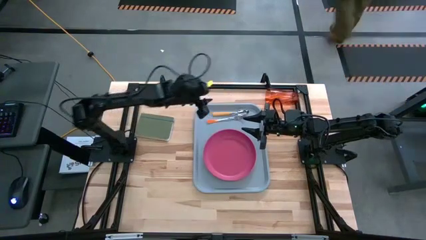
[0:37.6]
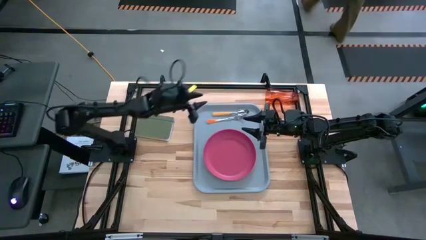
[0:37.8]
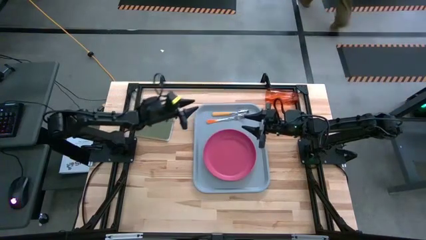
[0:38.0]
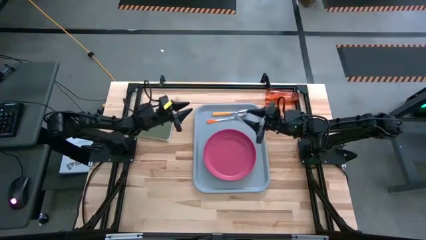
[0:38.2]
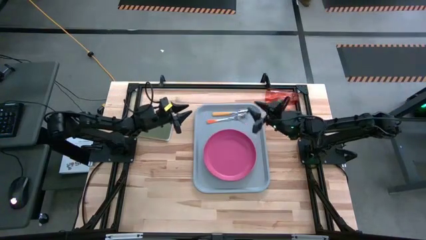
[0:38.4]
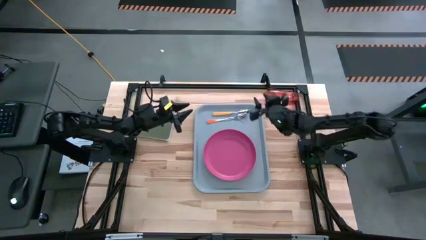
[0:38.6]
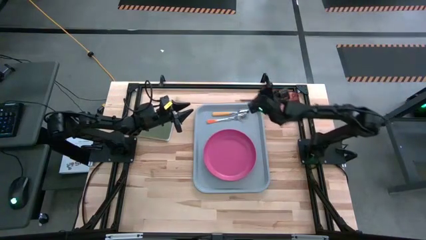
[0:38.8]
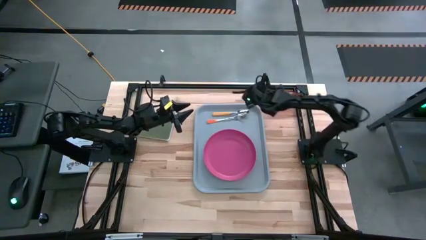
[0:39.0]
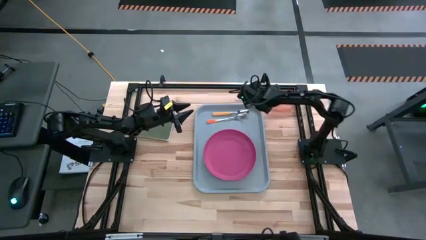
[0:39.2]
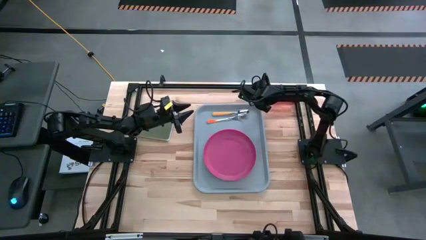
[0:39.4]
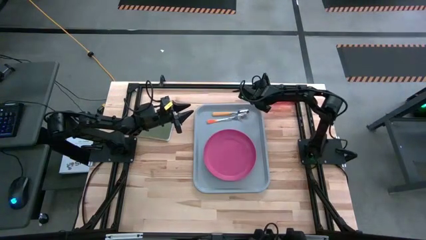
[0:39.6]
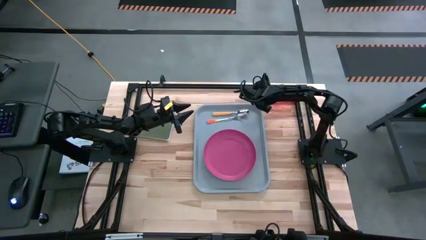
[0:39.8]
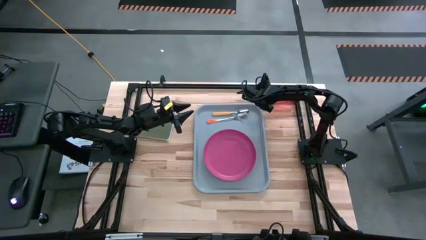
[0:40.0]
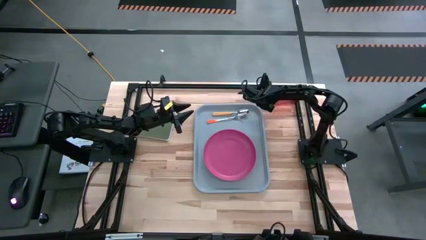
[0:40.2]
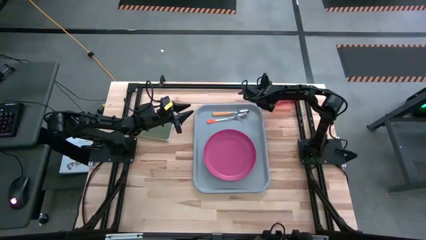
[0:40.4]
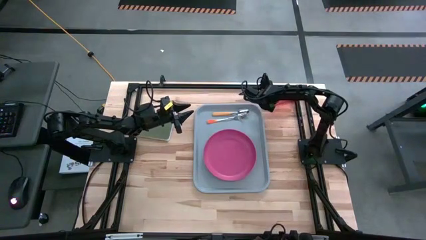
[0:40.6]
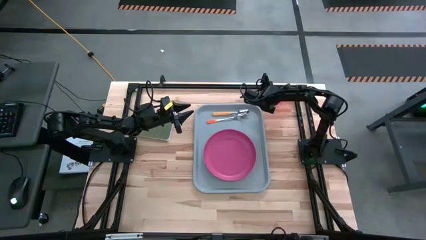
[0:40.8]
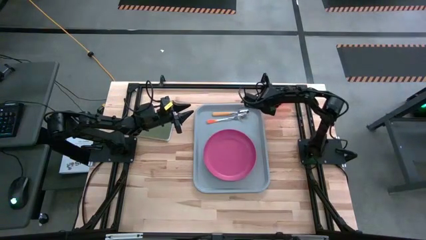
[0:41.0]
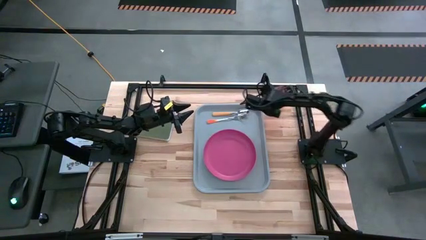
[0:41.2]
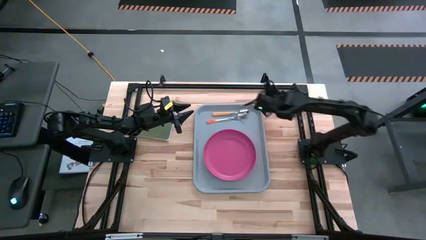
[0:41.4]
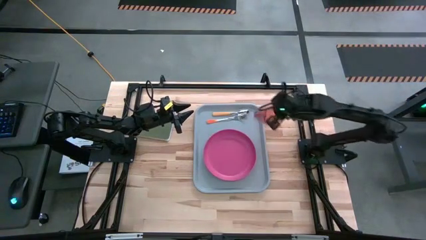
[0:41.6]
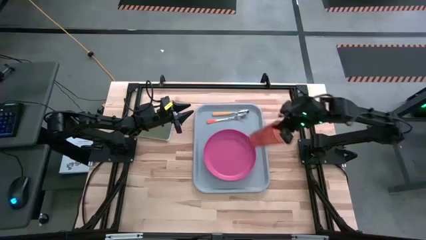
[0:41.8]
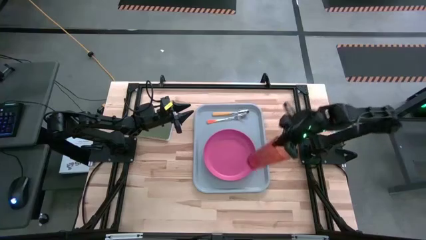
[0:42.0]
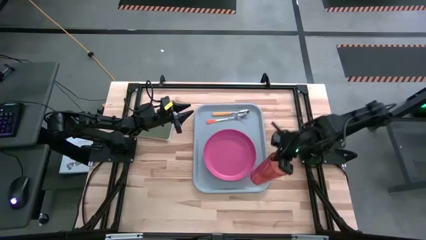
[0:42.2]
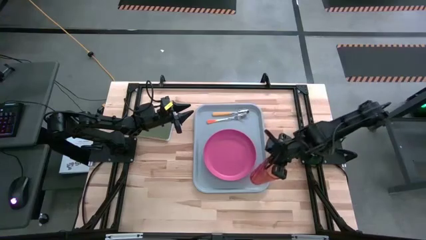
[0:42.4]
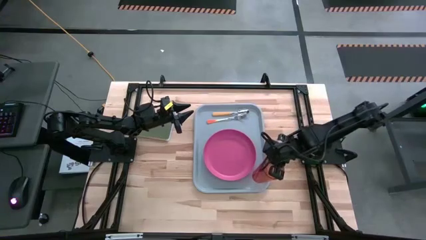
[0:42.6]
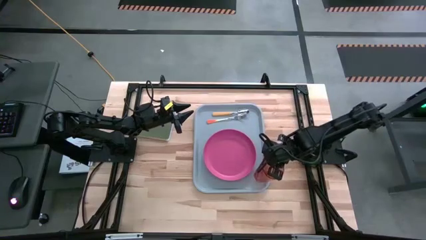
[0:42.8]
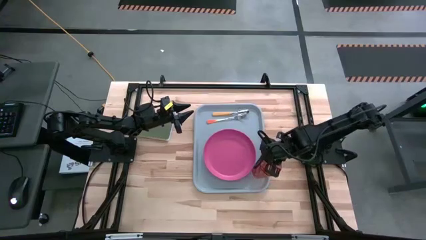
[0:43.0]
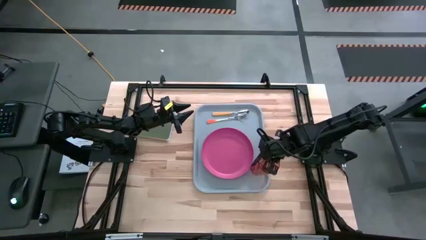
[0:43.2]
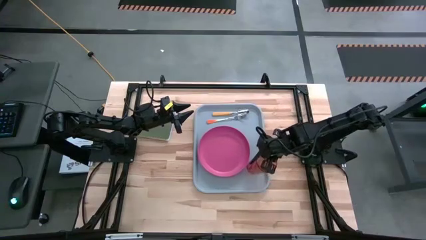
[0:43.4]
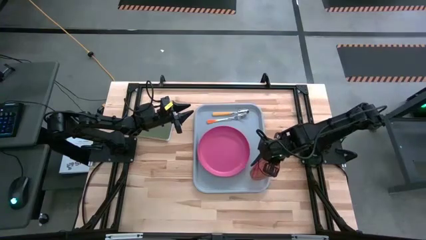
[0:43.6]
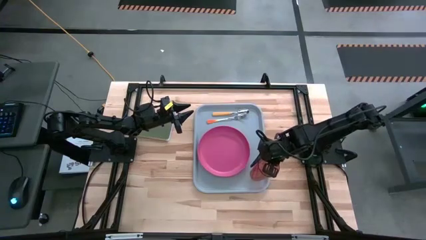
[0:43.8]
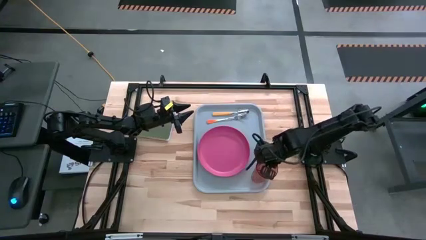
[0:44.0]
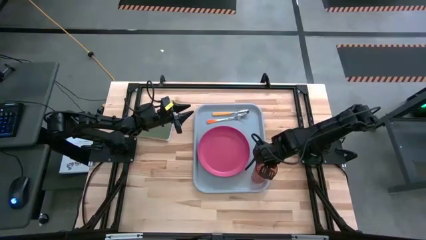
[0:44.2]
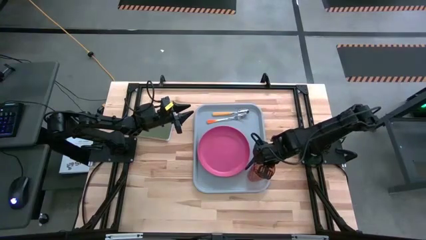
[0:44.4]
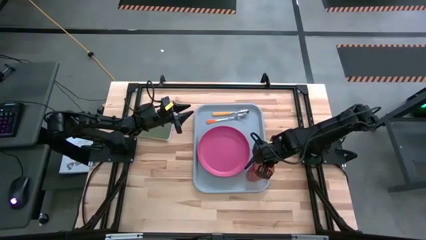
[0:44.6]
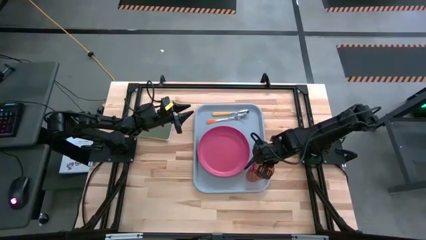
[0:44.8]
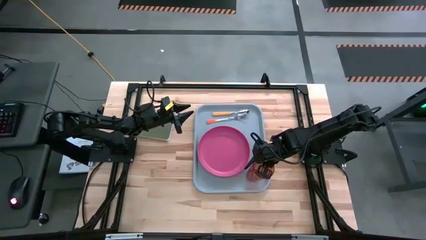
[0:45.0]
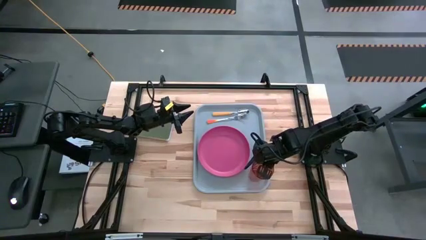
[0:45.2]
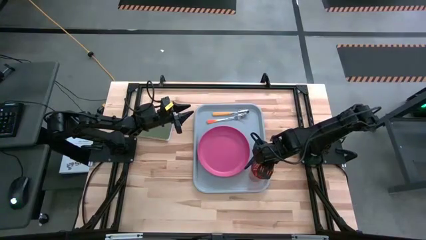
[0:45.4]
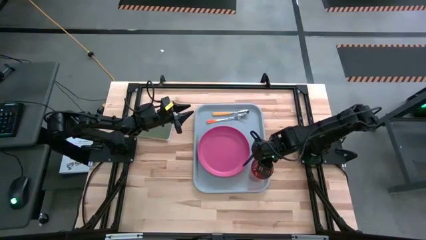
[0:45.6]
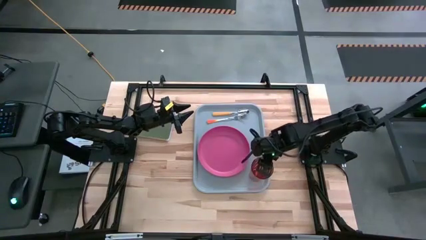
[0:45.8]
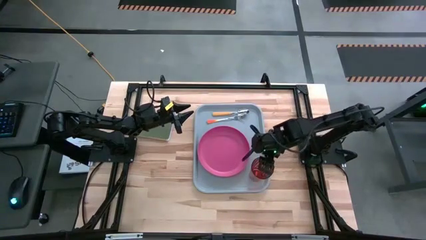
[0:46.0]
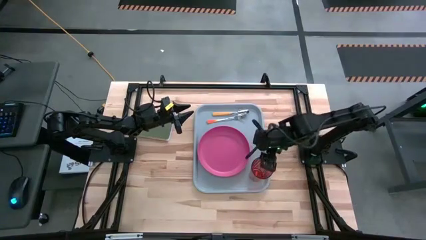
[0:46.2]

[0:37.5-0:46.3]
Task: Pick and place plate/cup/fork/spoon on tray
Put the red cup on the gray tray

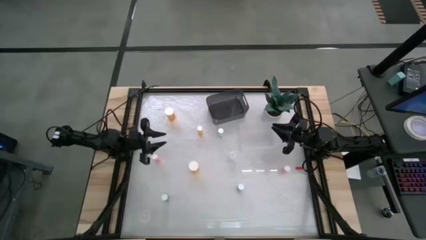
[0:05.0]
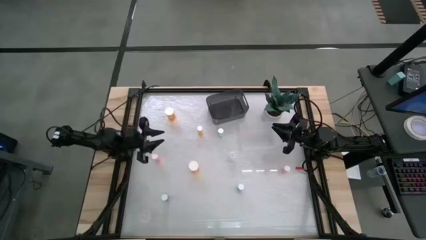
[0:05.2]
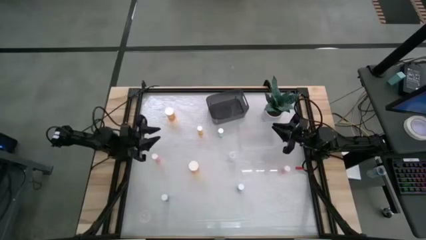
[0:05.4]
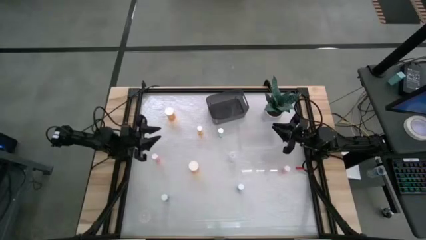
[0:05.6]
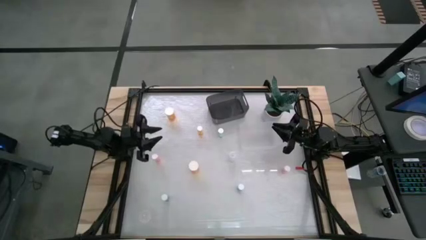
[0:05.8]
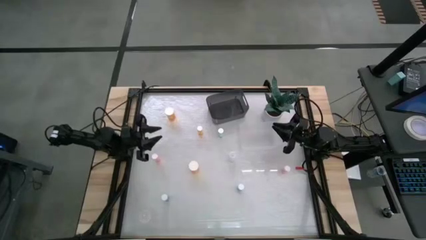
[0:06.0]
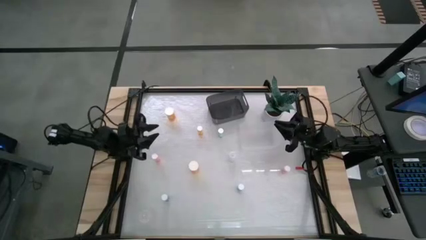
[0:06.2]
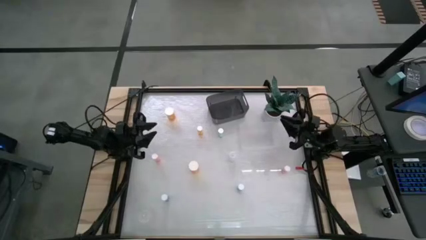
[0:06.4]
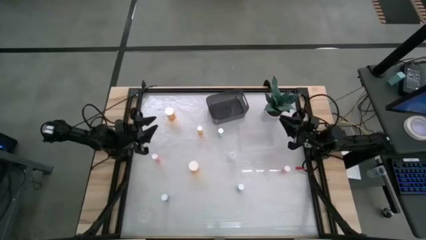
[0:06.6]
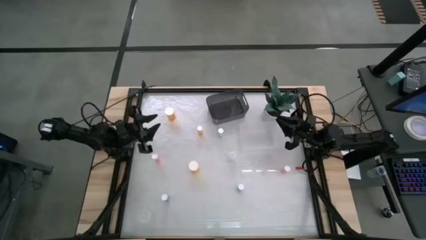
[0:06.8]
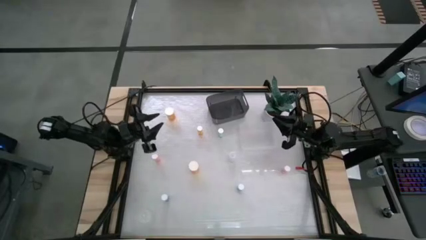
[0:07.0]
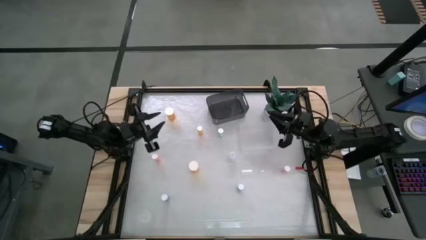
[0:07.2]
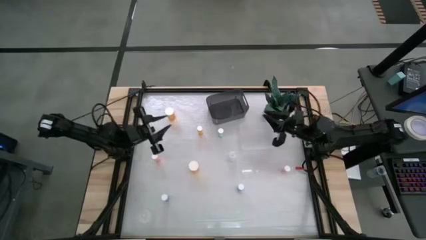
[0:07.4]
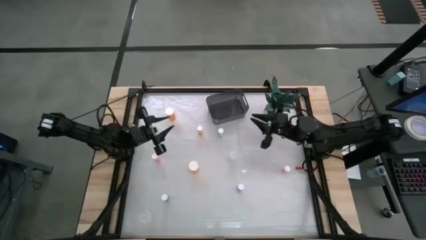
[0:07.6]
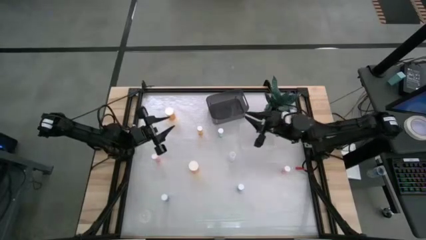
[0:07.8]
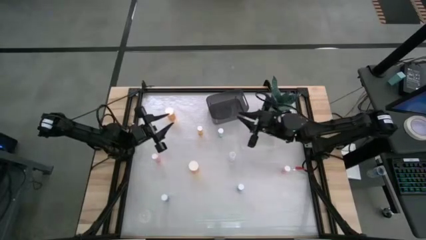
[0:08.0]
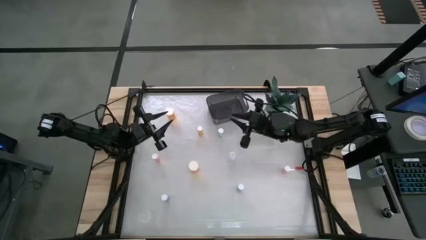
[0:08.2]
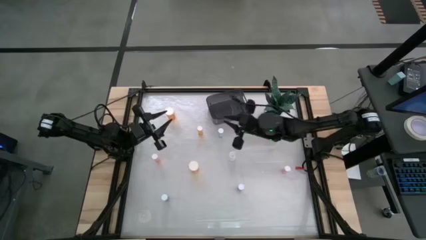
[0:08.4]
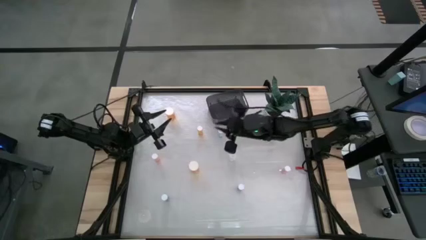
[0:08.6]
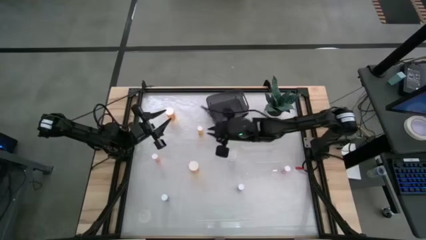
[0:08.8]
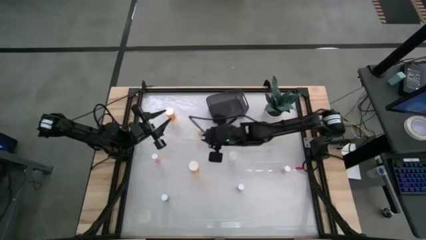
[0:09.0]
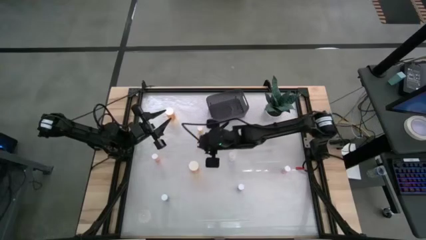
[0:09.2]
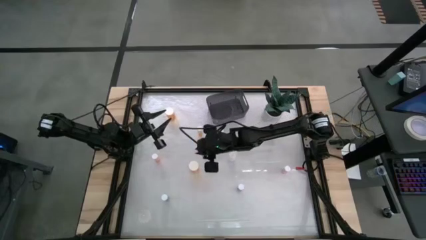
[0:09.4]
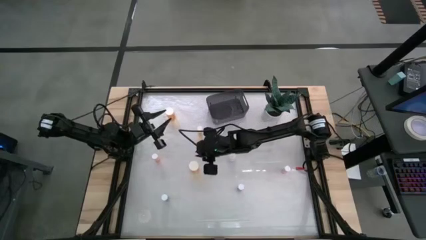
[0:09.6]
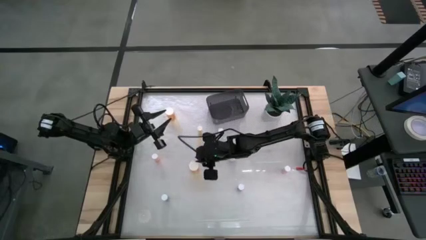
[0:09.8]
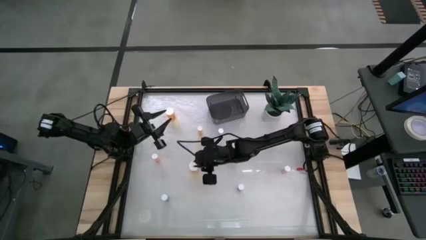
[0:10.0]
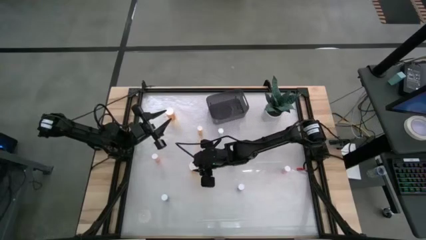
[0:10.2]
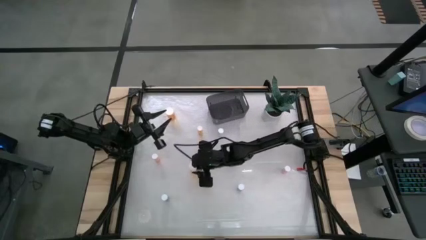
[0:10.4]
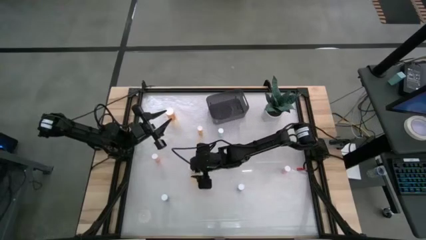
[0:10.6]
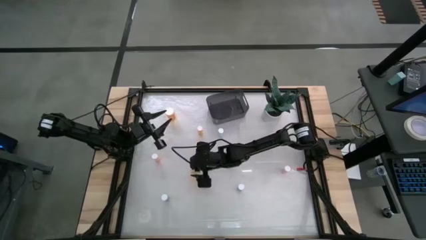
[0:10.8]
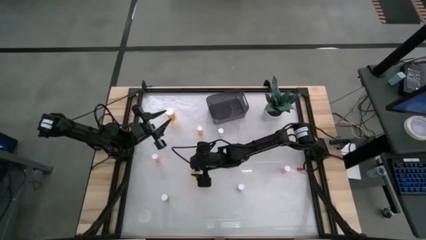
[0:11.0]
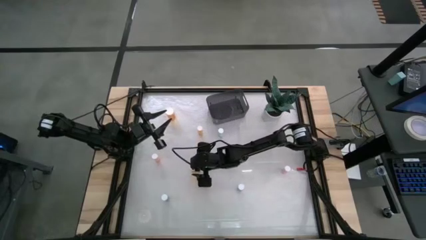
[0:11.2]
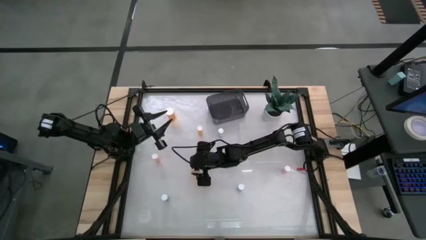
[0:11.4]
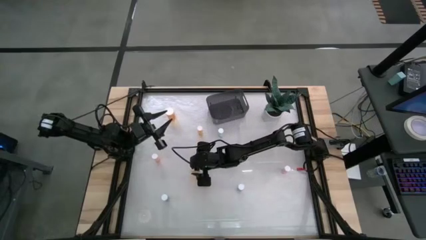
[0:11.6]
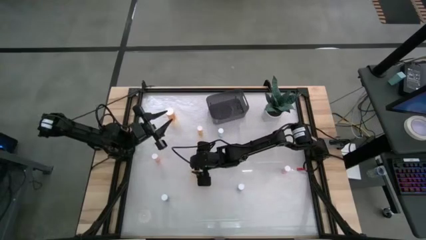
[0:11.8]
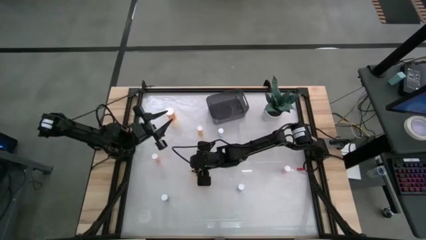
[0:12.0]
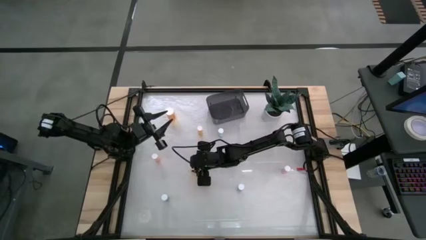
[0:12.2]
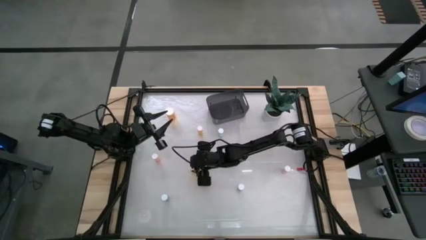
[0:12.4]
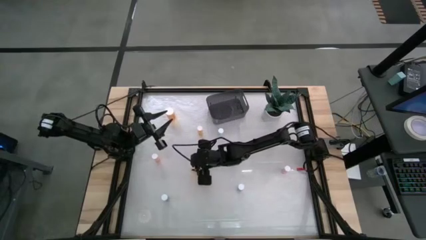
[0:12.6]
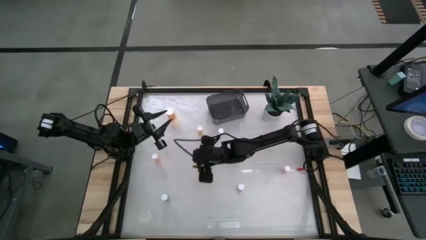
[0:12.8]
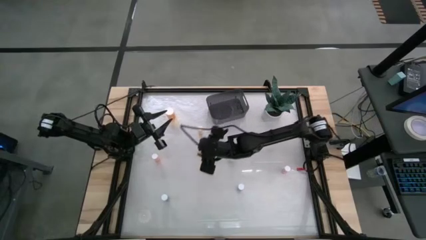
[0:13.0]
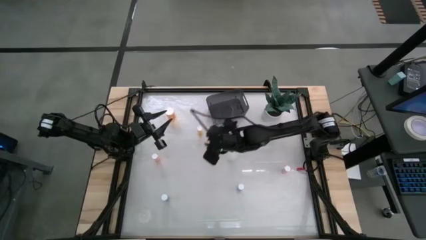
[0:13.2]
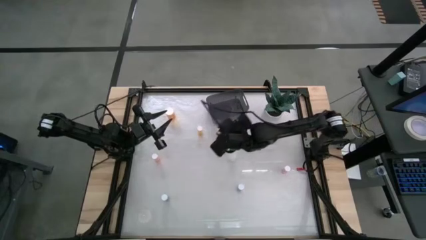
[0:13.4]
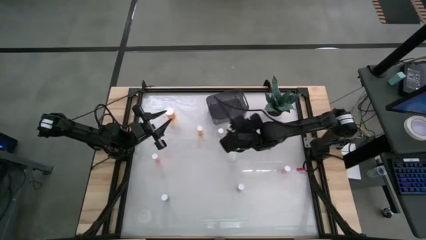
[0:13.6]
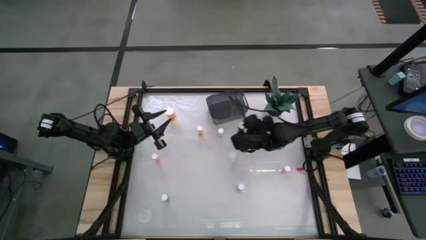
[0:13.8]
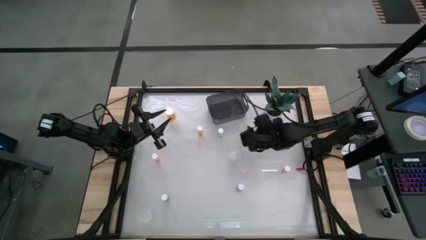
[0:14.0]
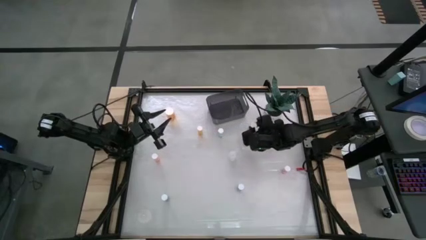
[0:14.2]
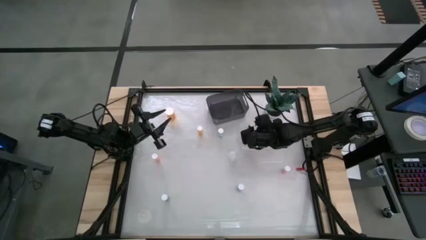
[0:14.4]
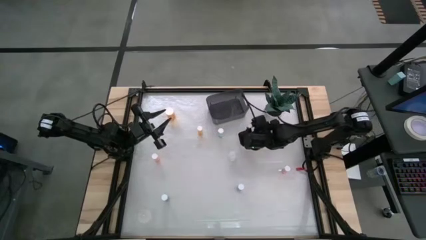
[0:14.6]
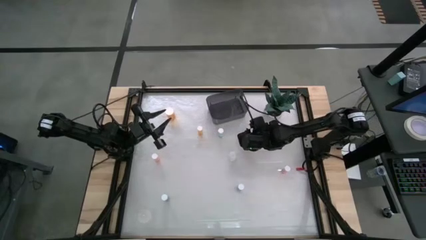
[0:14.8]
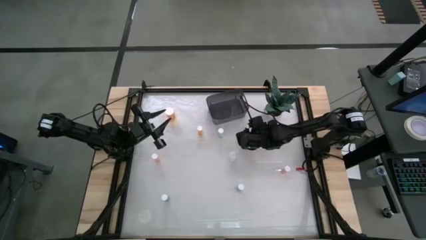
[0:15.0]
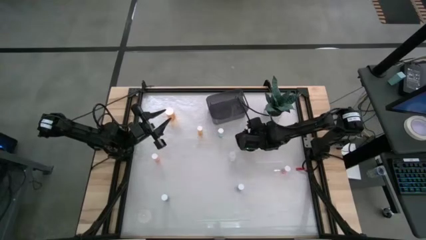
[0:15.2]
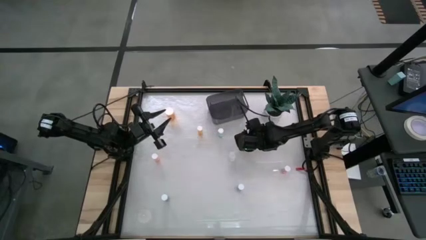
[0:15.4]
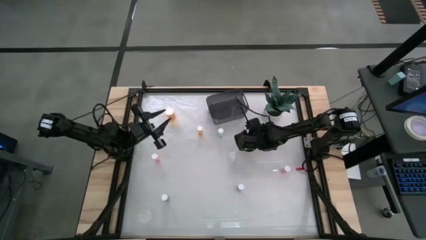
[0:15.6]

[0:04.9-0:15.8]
Task: Pick and place medicine bottles into bin by pill shape (circle, oval)
Put the bottom big yellow pill bottle into the transparent bin
